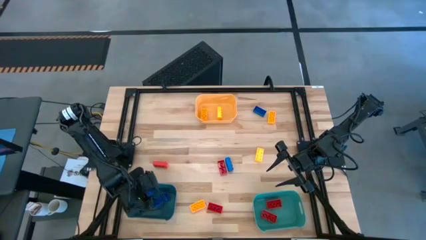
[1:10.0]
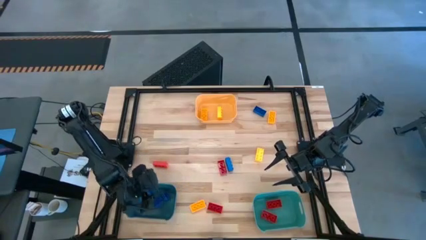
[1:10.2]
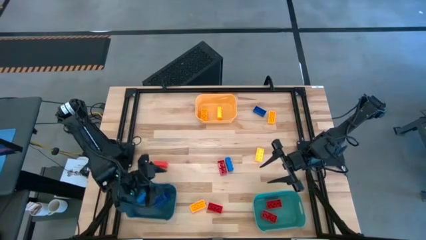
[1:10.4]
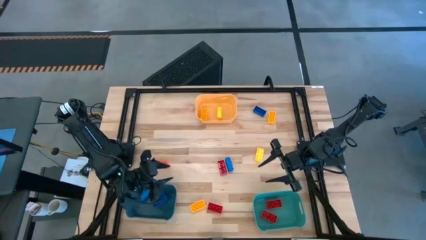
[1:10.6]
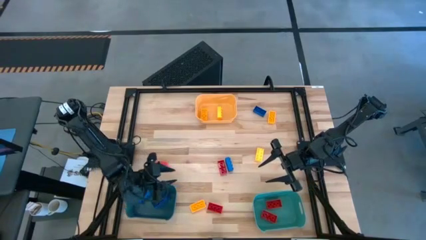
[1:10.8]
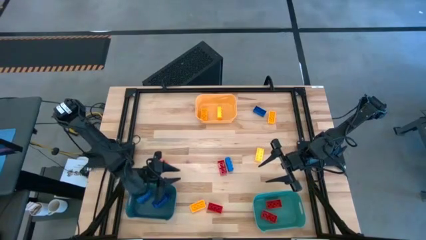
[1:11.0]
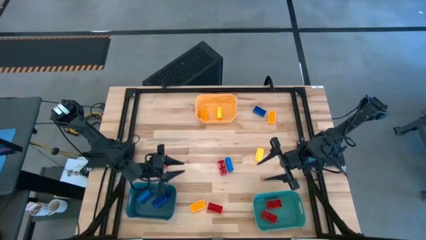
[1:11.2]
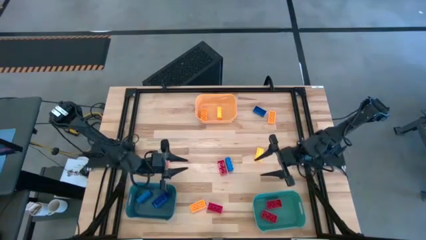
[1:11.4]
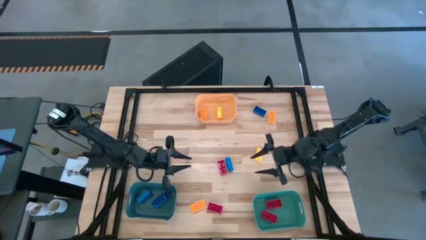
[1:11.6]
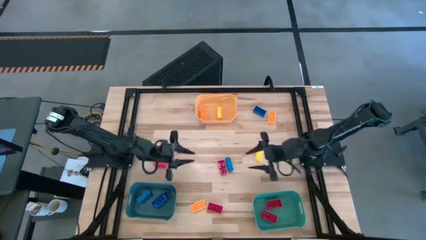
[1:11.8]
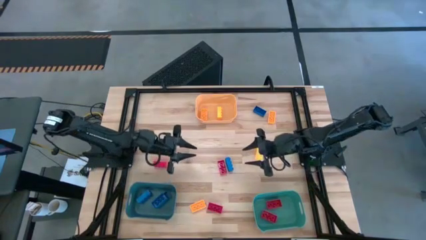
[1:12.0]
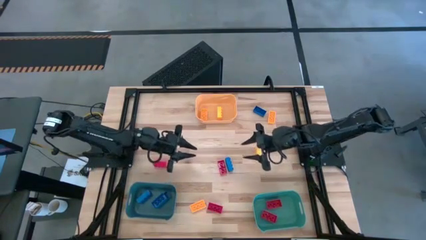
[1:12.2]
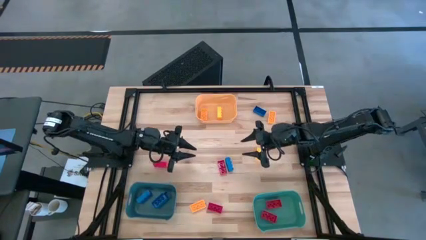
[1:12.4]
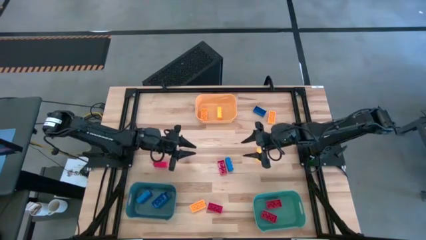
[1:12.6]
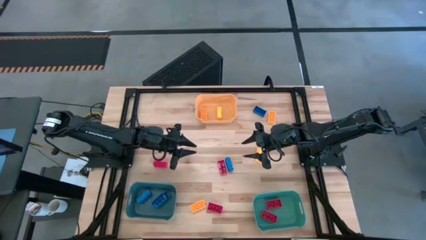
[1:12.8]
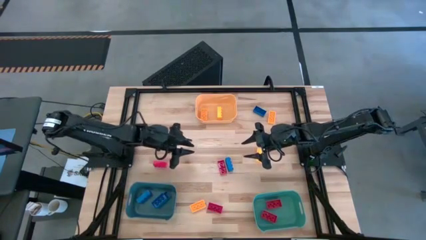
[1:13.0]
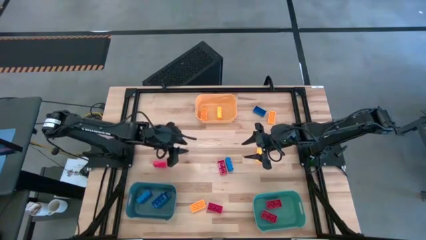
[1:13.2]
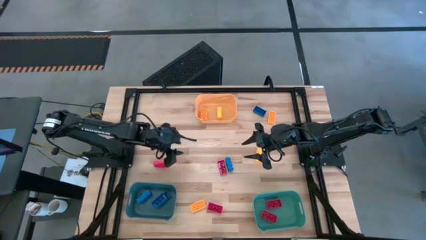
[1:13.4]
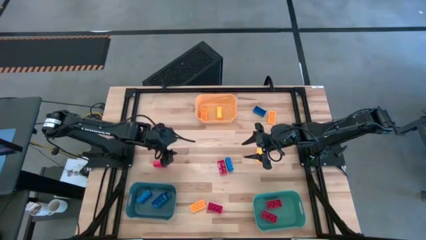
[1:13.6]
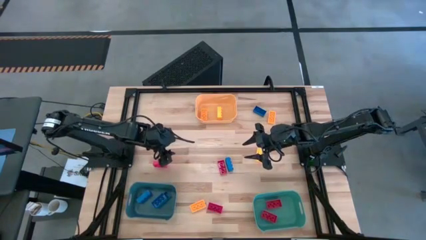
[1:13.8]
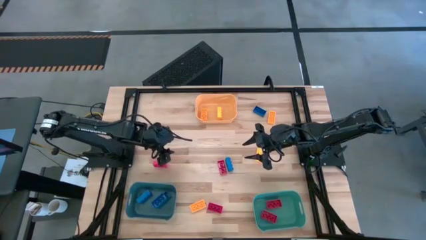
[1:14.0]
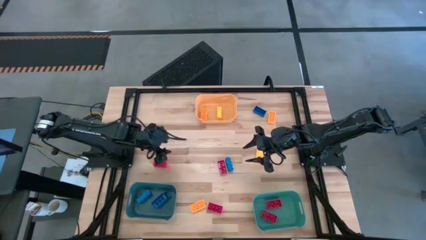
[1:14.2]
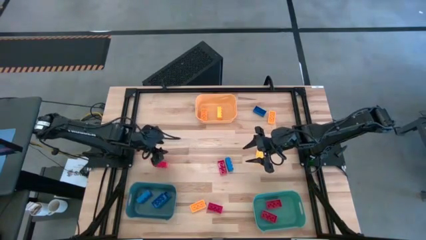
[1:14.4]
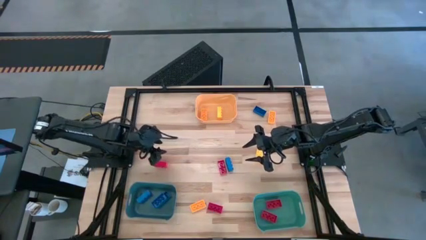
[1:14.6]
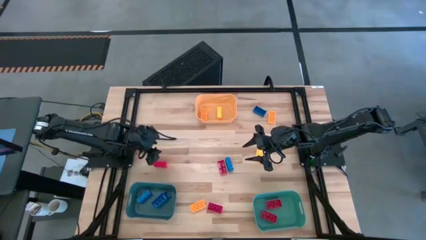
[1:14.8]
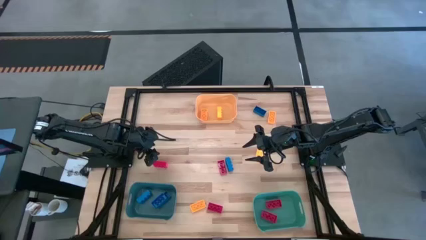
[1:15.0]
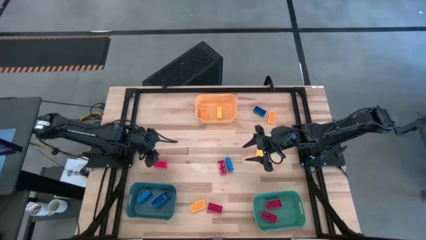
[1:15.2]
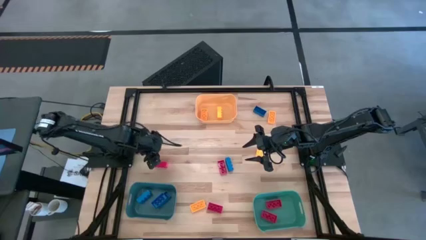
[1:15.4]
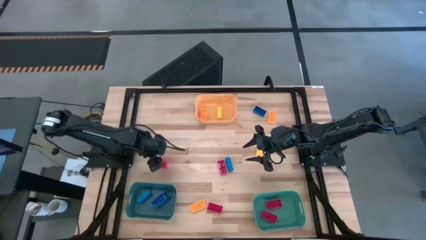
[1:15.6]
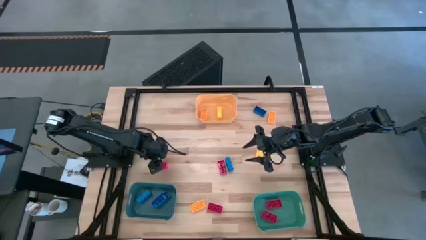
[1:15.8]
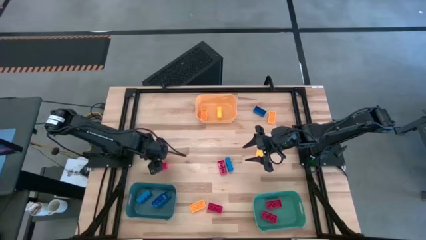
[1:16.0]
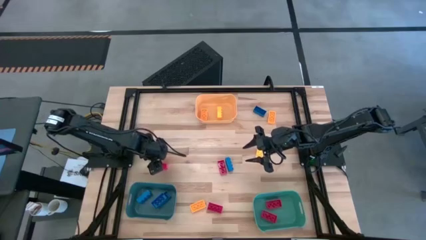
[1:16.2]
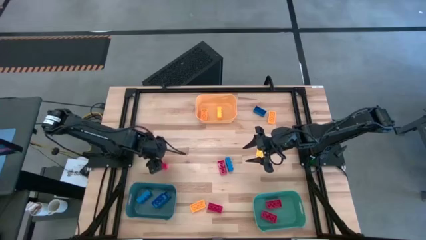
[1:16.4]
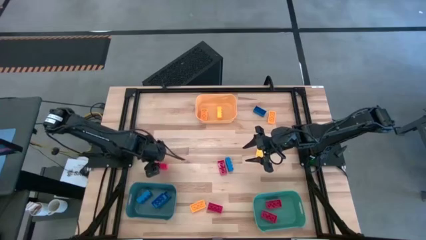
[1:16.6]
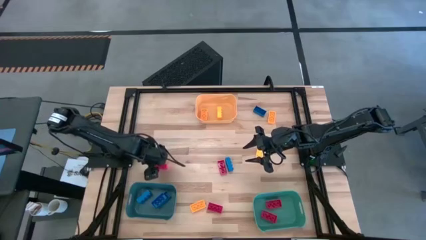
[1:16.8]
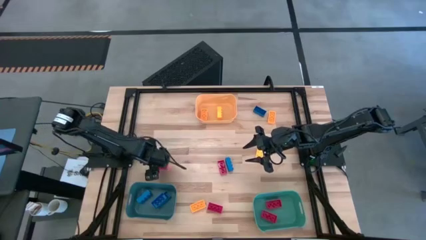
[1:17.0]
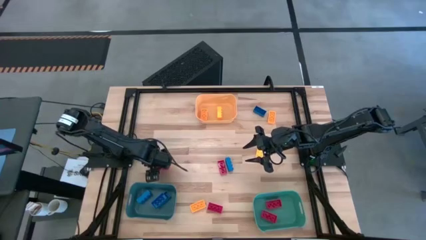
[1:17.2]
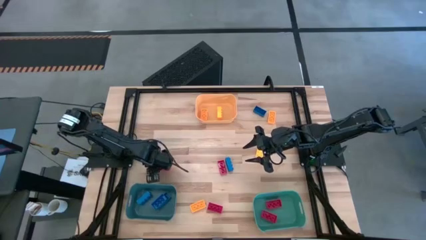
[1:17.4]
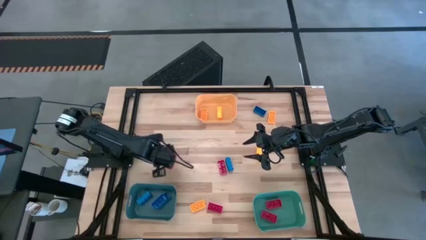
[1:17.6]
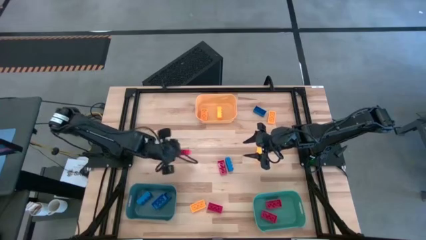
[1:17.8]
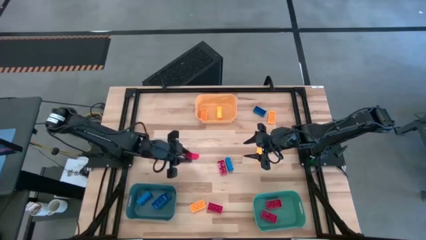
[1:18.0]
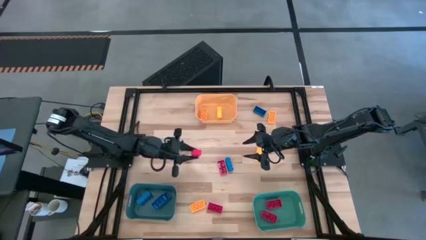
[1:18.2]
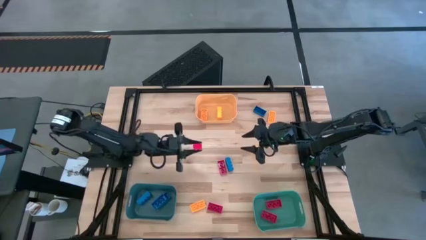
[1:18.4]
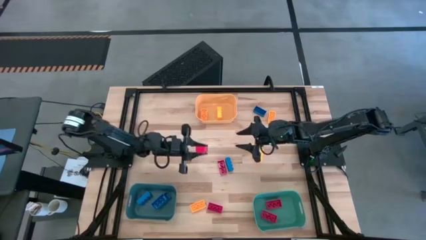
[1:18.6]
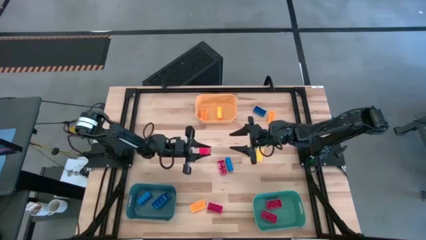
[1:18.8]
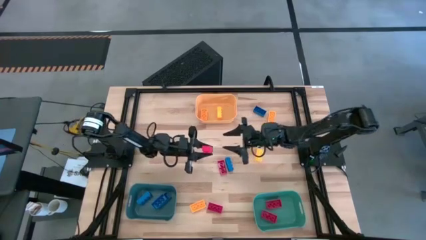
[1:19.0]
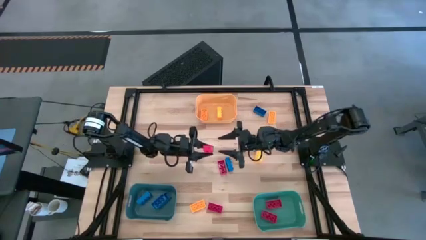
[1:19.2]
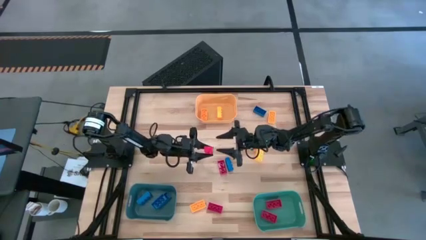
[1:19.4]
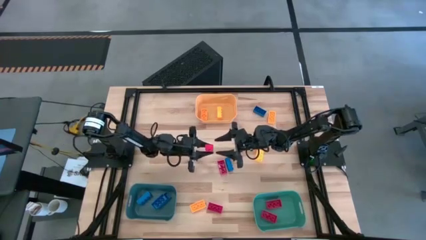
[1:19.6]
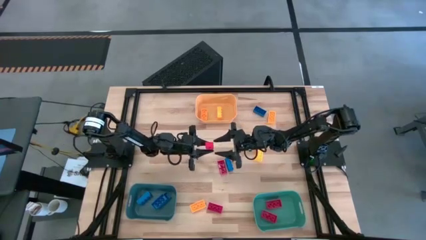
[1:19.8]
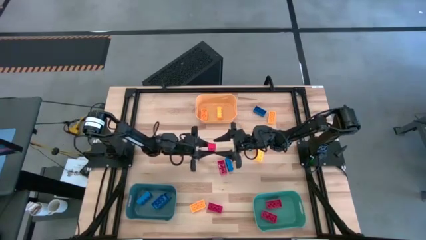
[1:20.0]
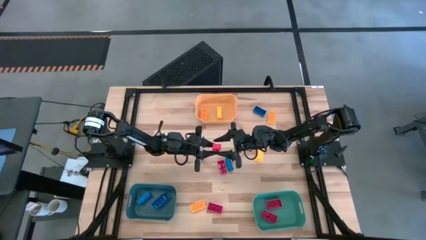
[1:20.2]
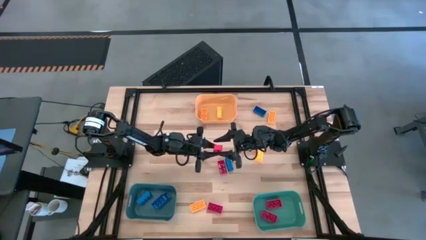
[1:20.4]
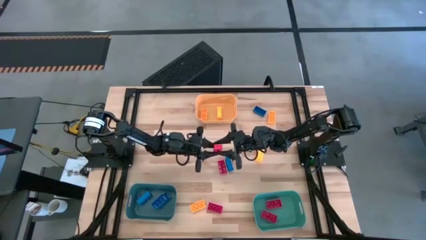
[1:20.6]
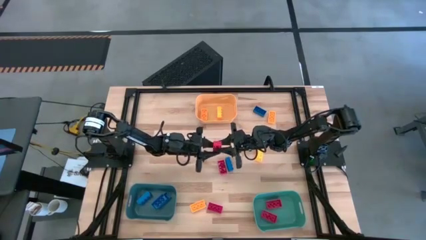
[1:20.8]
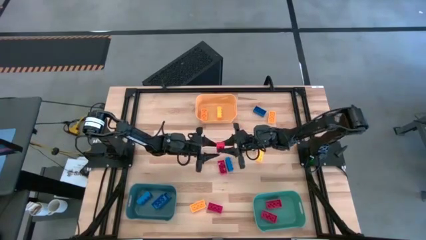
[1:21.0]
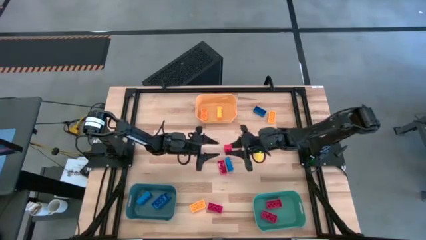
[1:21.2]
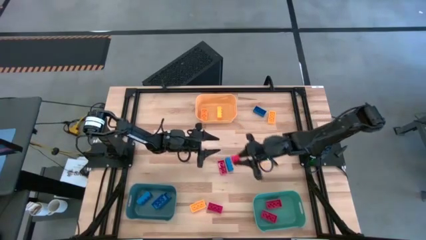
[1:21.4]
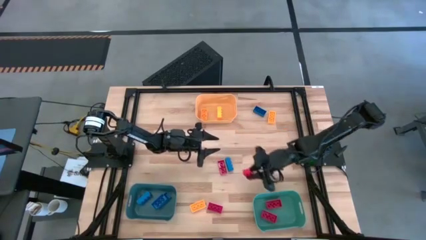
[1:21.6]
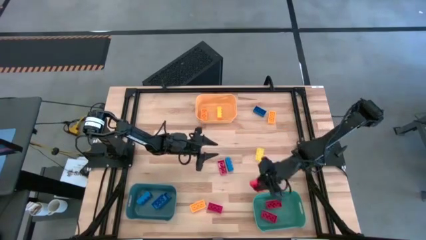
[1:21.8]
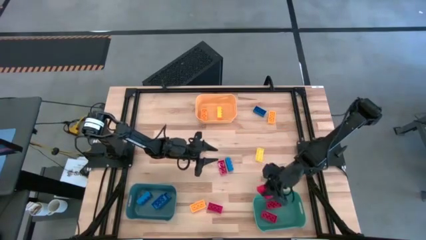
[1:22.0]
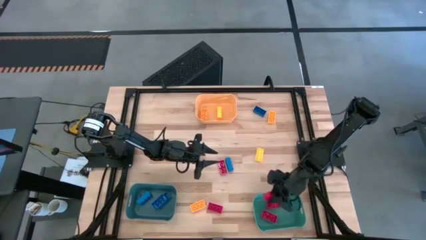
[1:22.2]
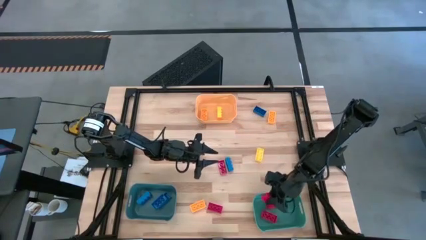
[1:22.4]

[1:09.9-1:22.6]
Task: Sort & place blocks by color
Put the red game piece into the green bin

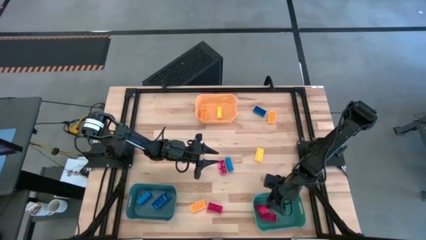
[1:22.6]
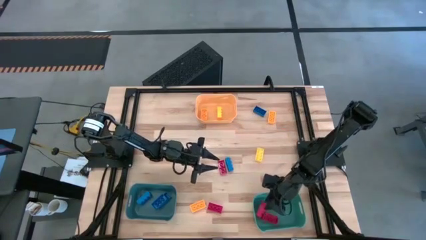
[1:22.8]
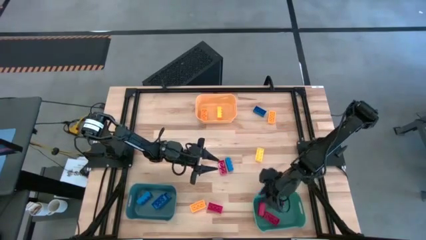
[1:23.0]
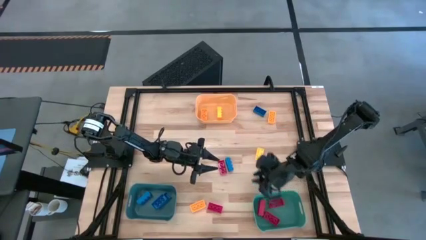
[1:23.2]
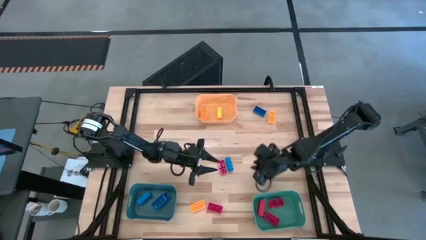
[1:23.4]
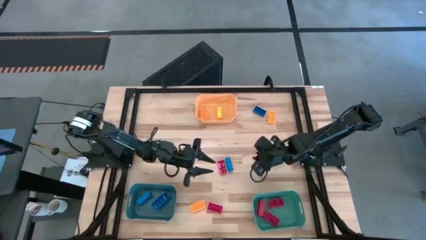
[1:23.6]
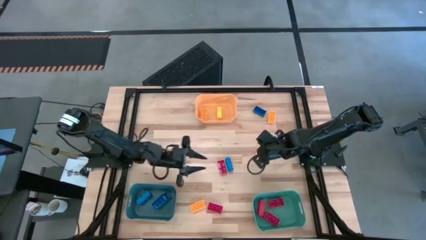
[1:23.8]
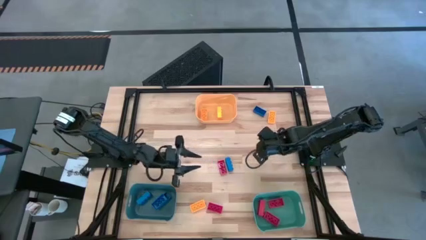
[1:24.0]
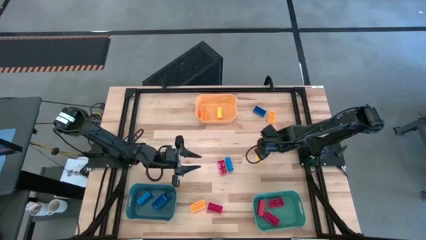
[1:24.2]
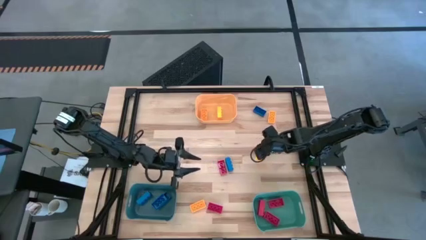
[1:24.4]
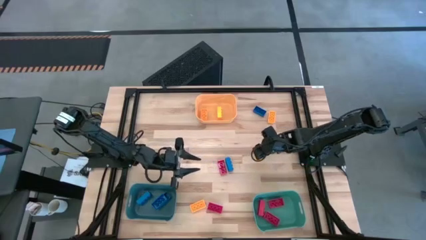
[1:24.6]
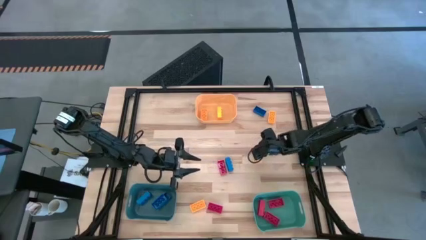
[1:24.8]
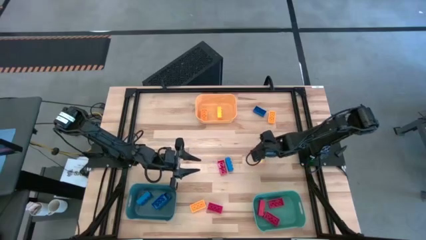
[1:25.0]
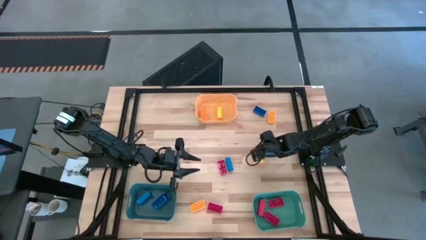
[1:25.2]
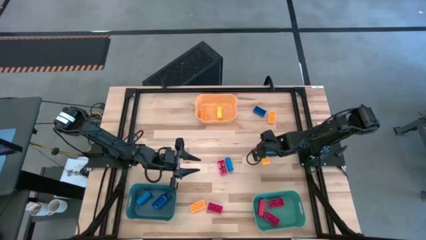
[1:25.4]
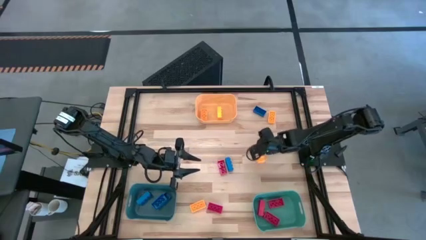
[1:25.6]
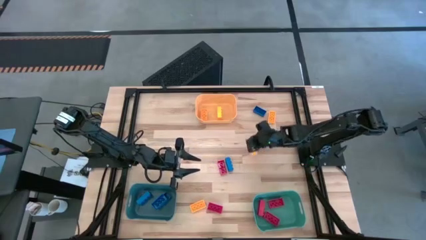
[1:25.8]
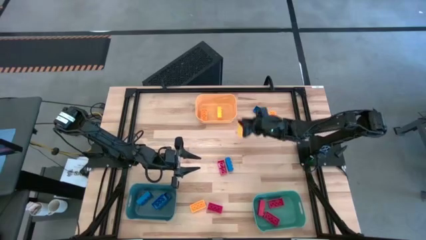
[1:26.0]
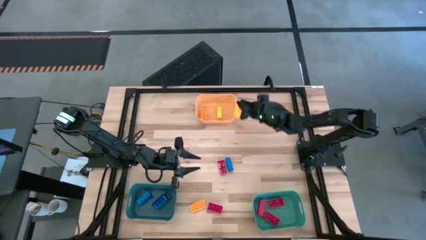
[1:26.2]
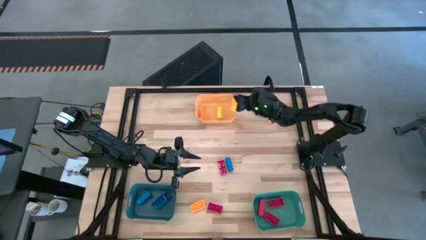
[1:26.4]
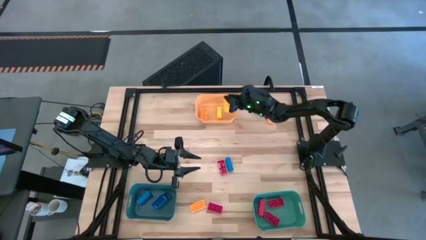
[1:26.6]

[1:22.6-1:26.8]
Put the yellow game piece into the yellow bin
